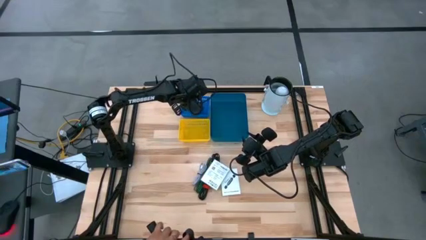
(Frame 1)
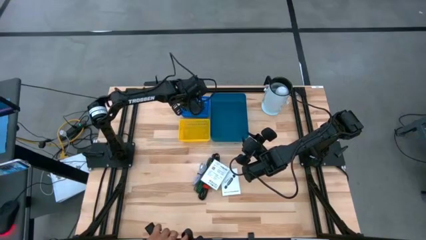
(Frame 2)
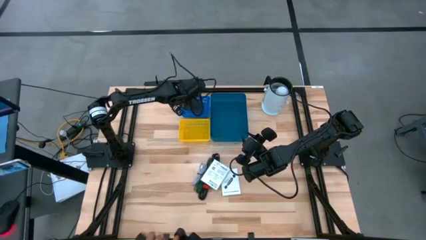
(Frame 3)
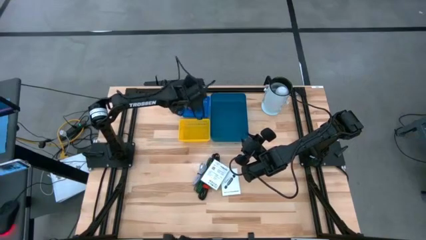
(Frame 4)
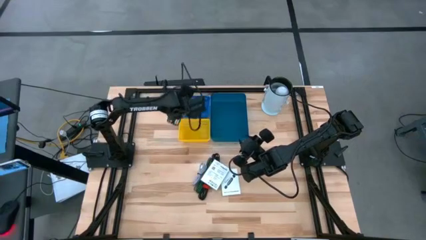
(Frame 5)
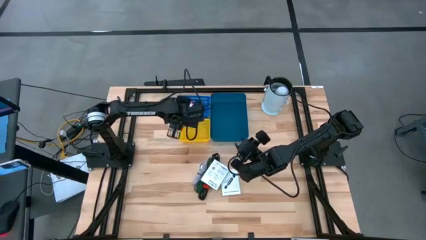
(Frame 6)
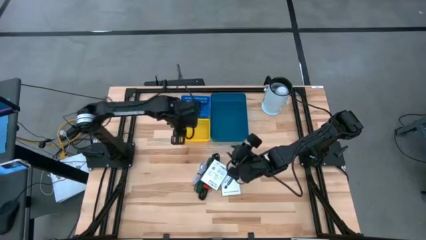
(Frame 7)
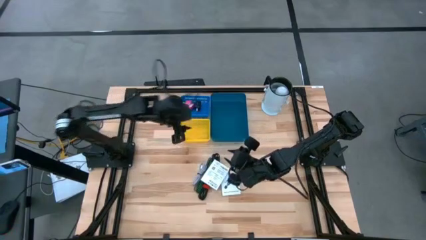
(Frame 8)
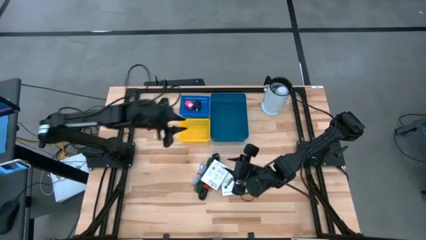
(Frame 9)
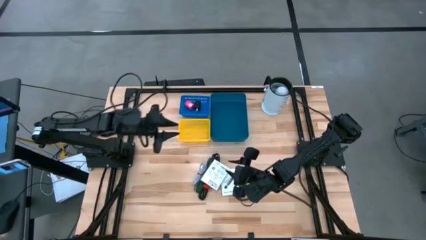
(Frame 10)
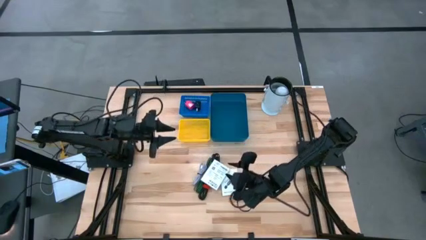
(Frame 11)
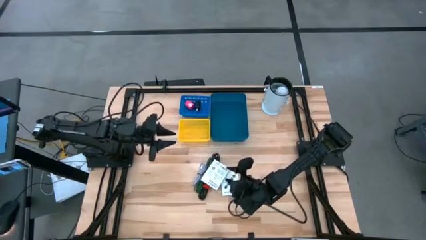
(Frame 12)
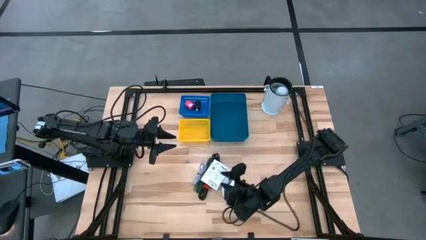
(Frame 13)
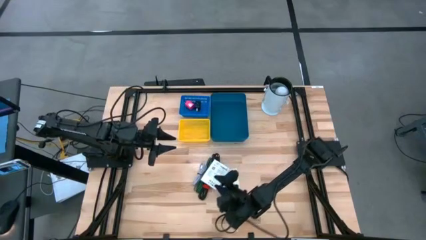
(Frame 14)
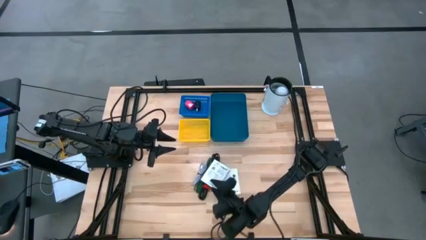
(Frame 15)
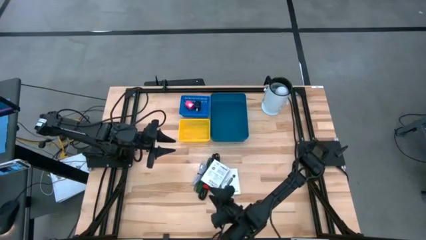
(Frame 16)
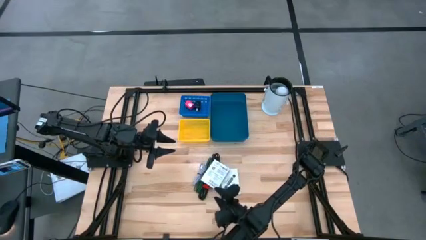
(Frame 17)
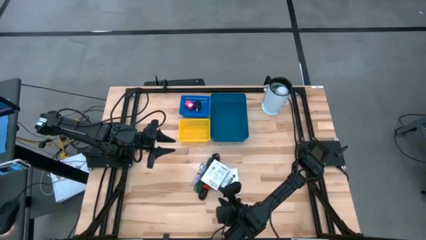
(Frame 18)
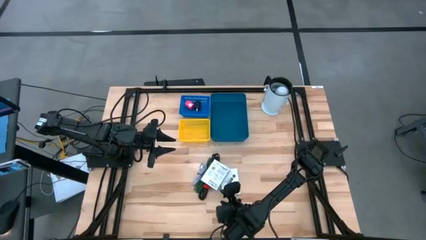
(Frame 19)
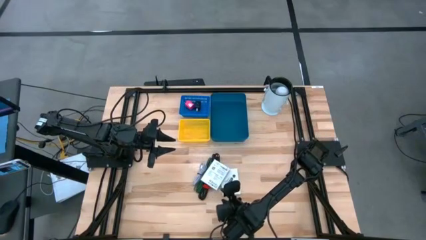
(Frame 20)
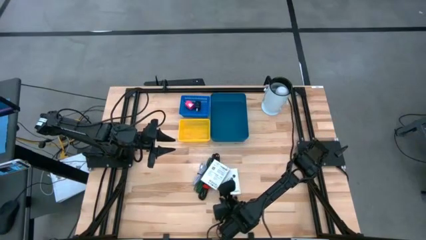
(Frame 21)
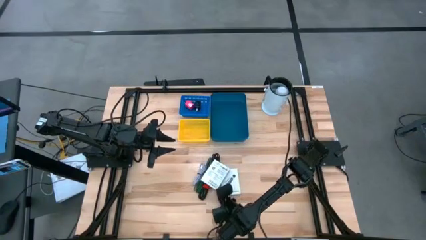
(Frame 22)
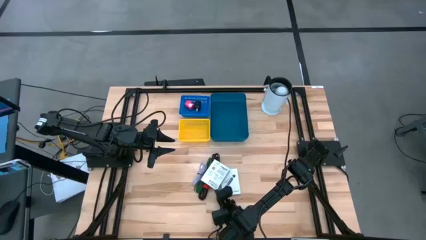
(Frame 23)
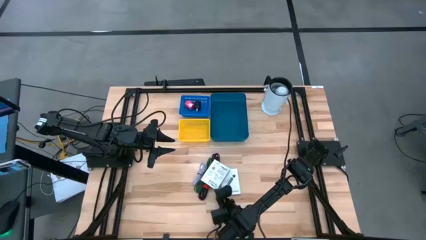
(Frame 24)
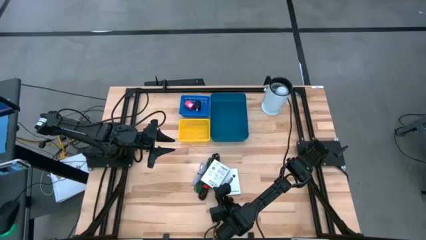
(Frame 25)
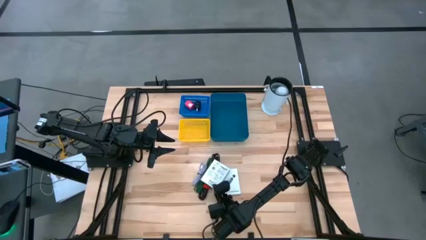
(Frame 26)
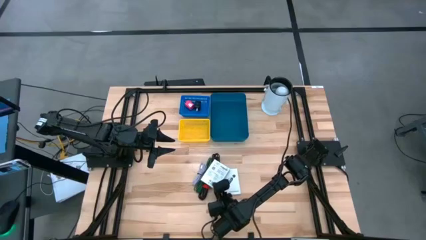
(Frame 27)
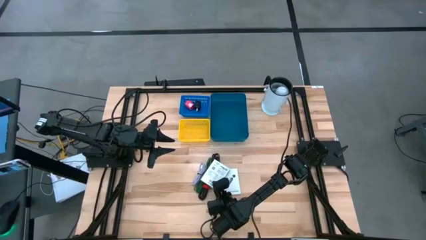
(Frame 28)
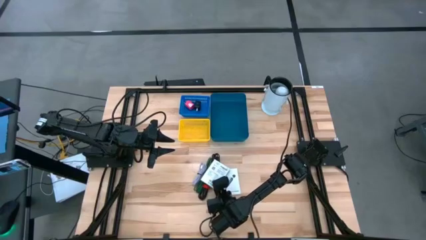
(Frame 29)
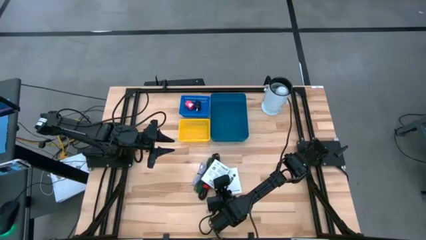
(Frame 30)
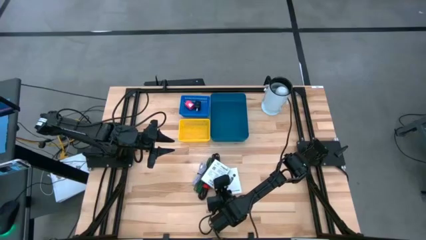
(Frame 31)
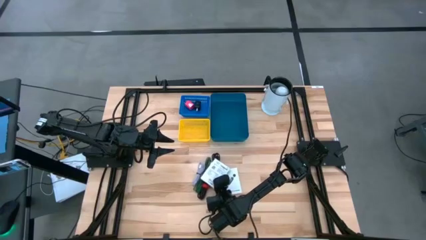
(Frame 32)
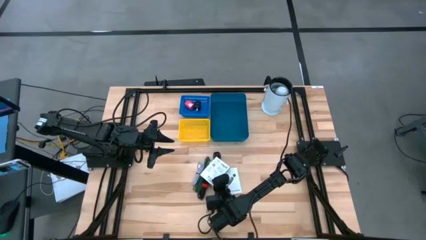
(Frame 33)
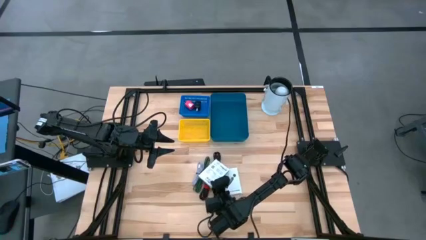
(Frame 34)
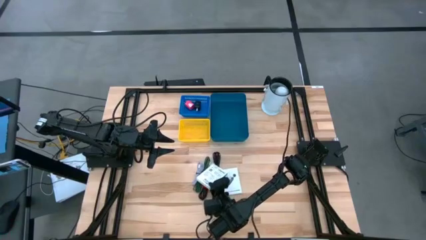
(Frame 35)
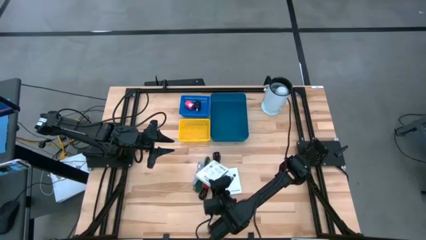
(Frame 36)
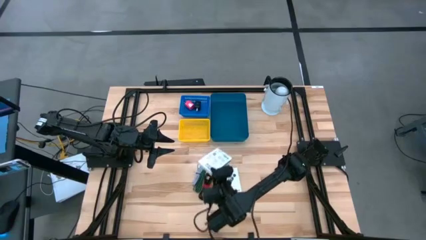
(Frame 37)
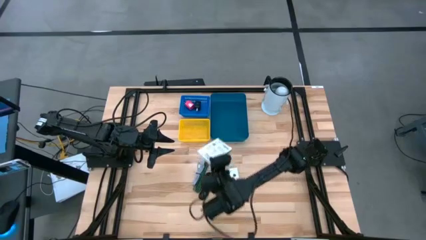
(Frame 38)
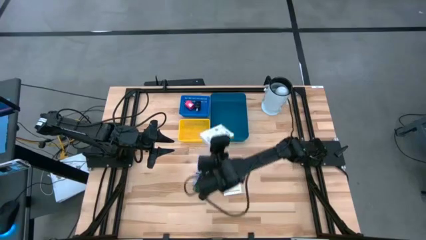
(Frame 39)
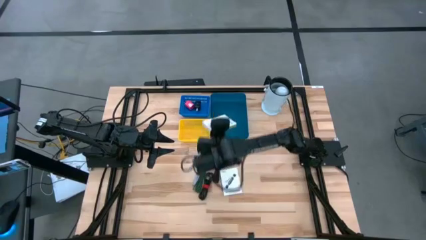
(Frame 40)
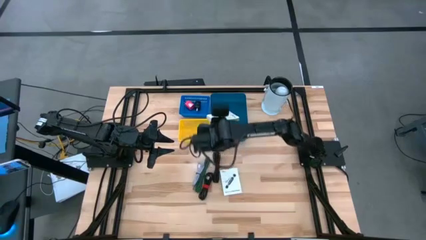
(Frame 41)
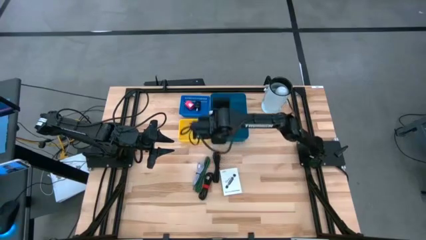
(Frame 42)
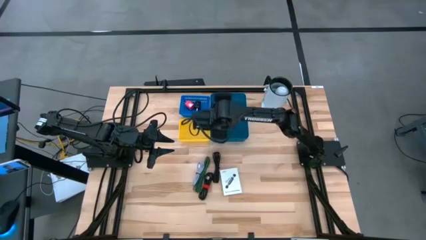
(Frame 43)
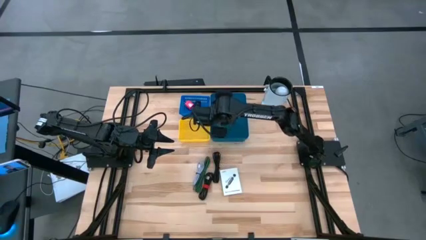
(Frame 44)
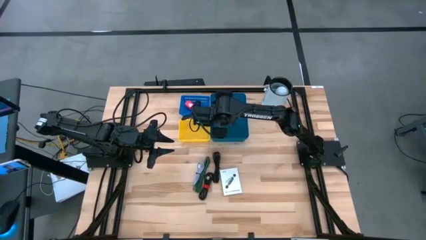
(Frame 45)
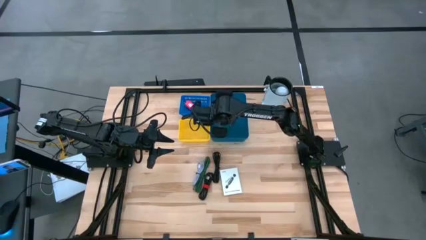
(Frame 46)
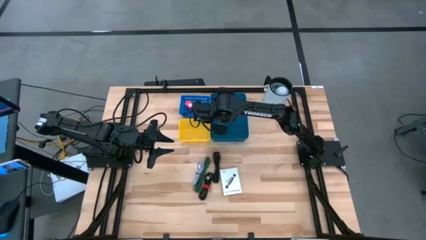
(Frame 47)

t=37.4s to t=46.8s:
Task: Pick and place items into bin
Put the left SD card reader box into the blue bin

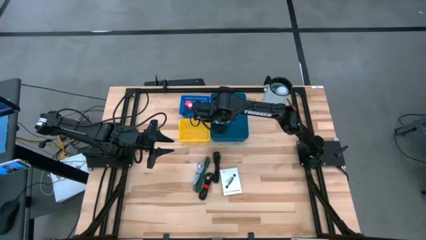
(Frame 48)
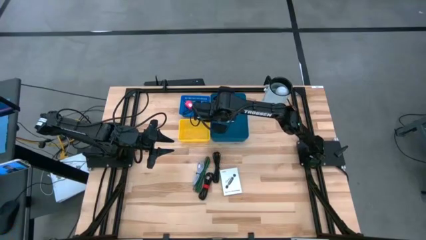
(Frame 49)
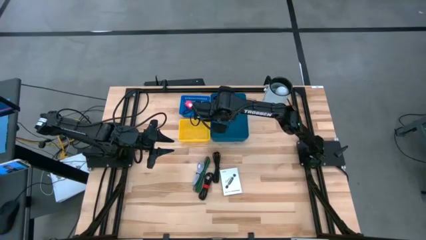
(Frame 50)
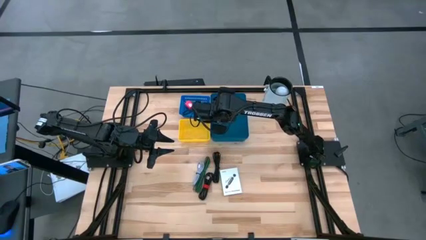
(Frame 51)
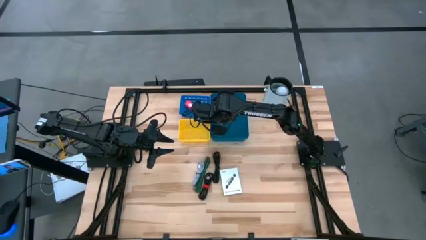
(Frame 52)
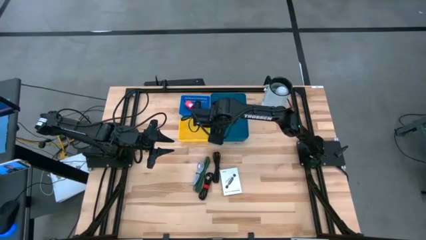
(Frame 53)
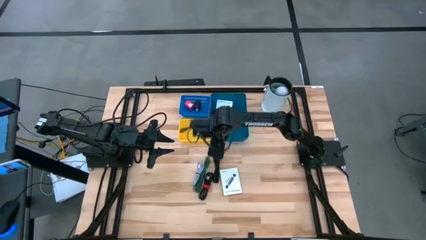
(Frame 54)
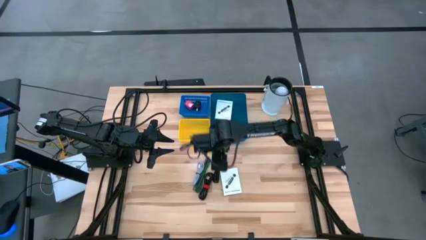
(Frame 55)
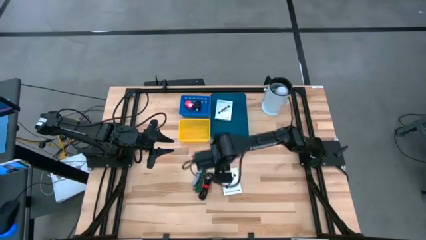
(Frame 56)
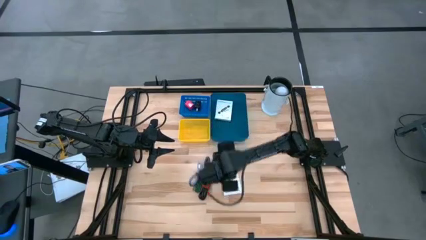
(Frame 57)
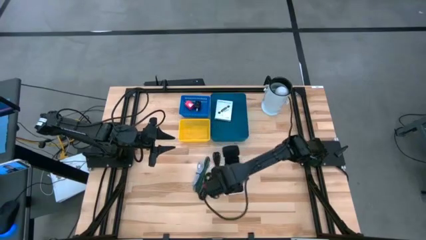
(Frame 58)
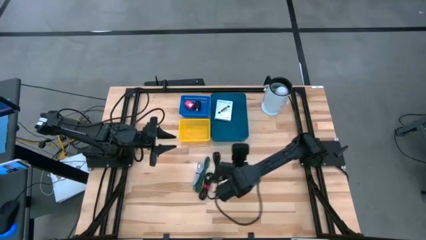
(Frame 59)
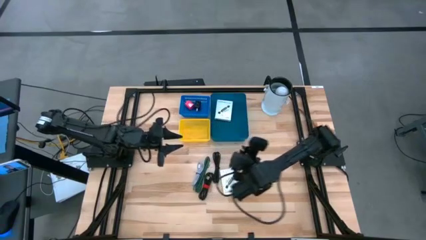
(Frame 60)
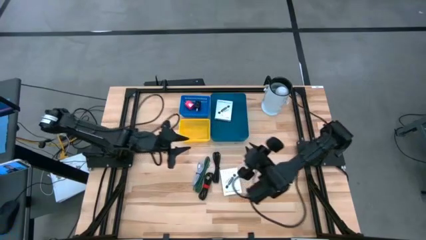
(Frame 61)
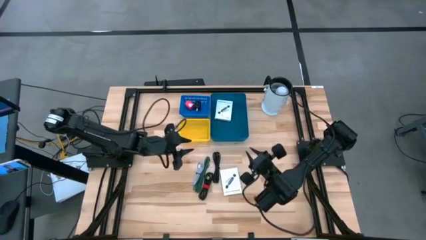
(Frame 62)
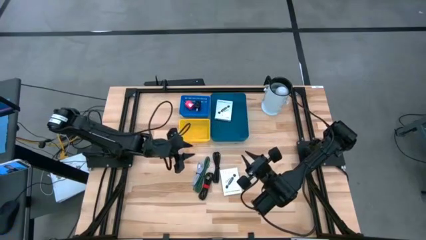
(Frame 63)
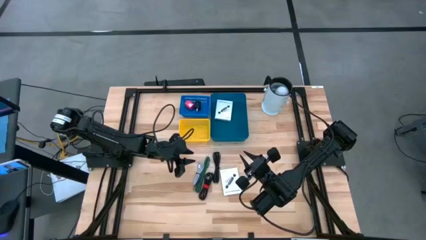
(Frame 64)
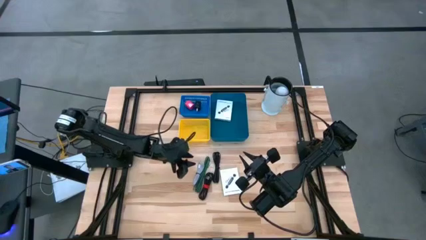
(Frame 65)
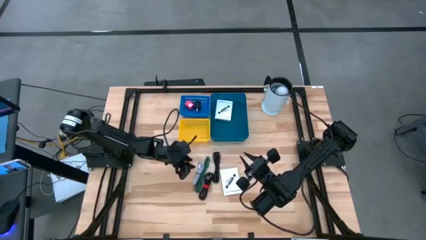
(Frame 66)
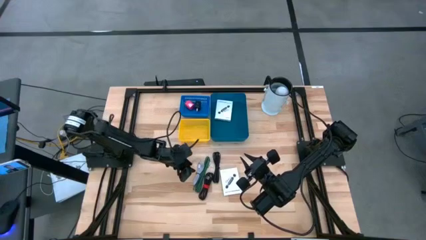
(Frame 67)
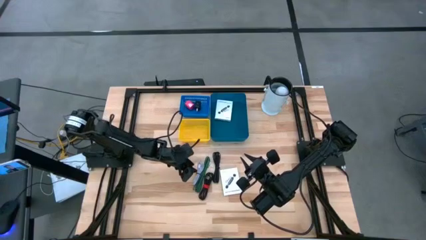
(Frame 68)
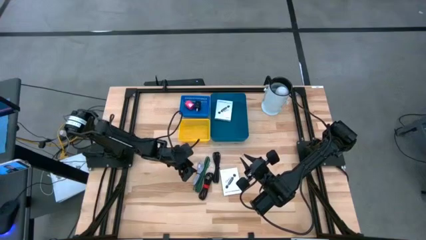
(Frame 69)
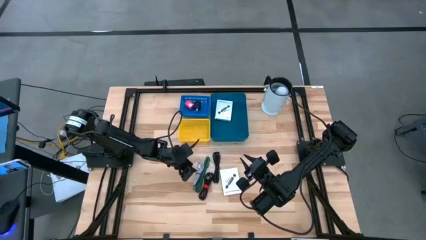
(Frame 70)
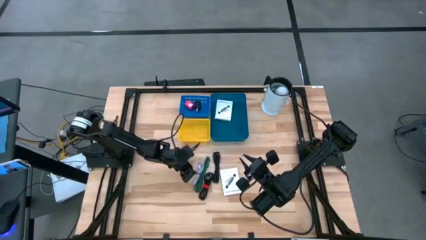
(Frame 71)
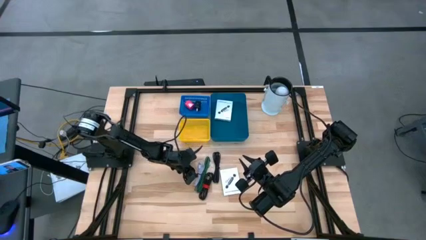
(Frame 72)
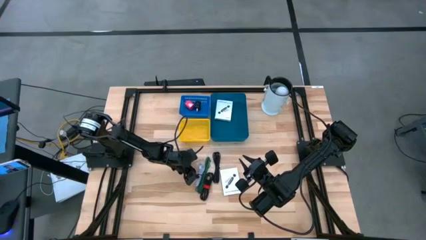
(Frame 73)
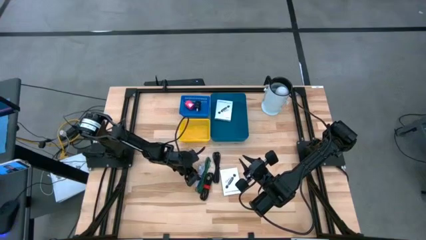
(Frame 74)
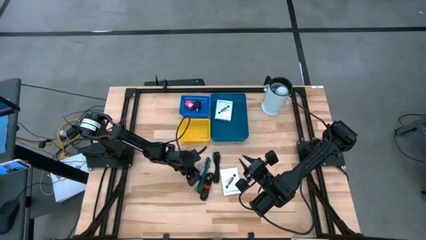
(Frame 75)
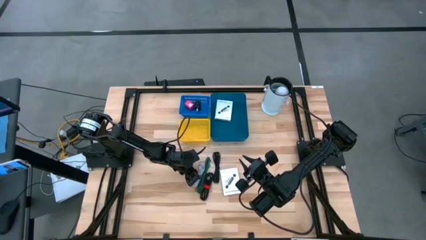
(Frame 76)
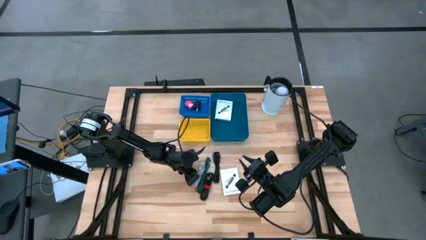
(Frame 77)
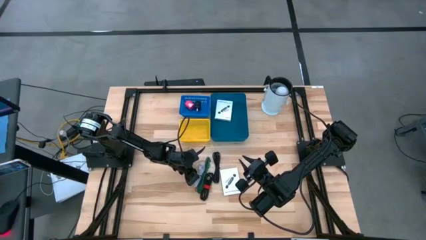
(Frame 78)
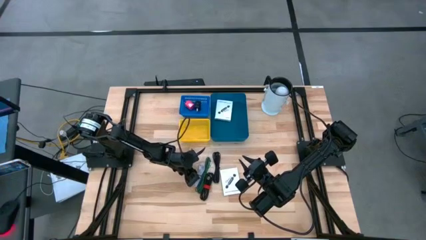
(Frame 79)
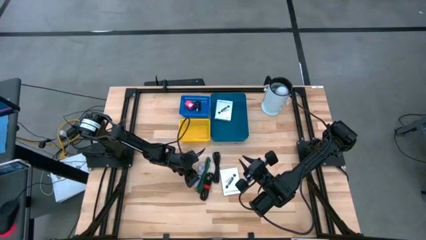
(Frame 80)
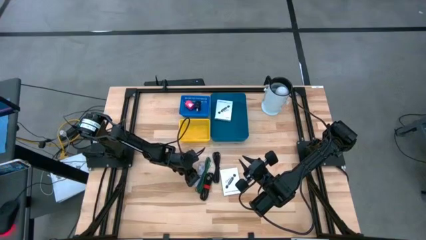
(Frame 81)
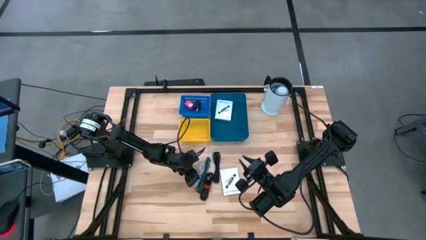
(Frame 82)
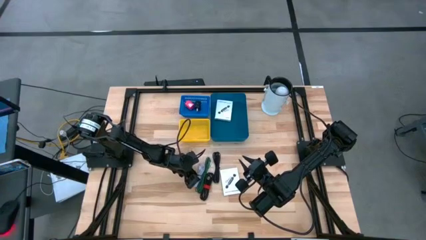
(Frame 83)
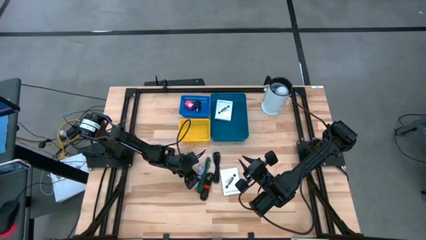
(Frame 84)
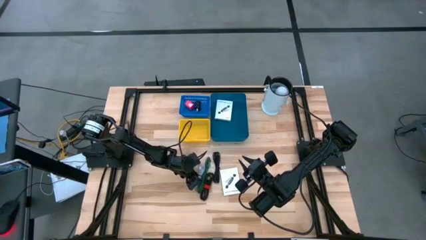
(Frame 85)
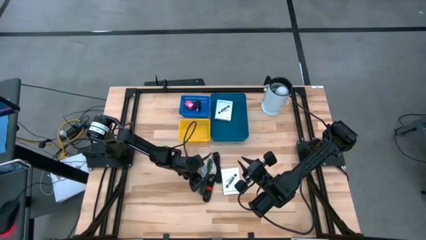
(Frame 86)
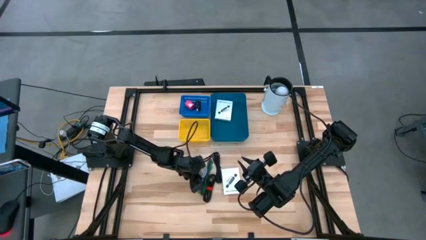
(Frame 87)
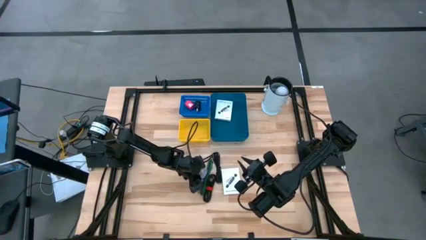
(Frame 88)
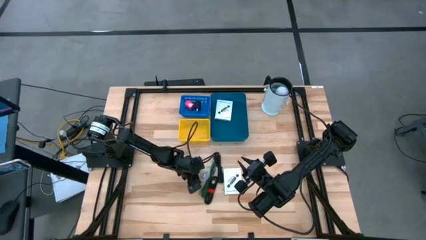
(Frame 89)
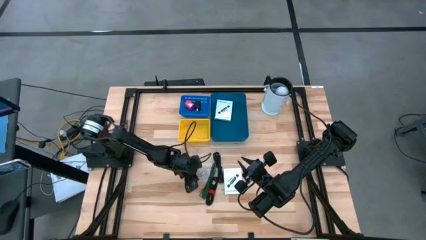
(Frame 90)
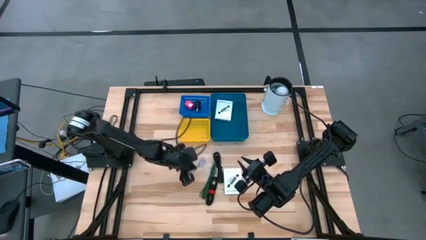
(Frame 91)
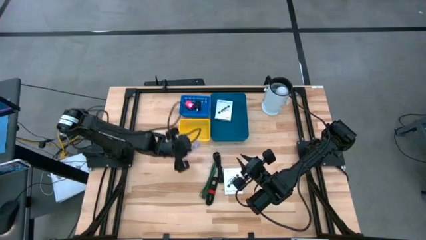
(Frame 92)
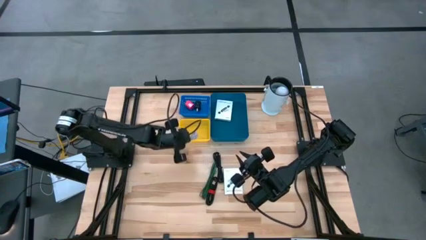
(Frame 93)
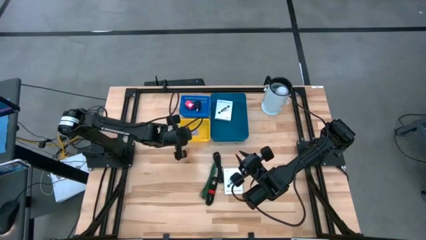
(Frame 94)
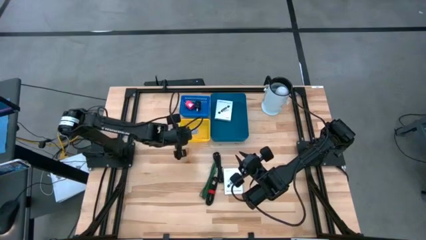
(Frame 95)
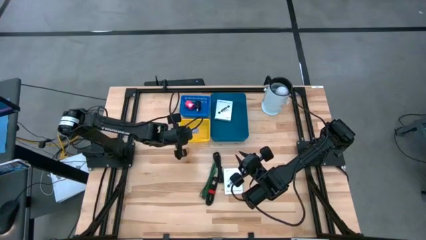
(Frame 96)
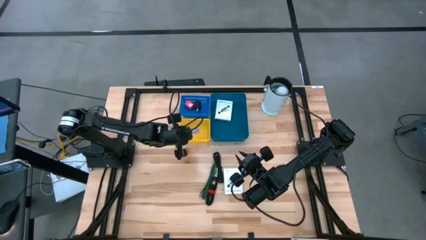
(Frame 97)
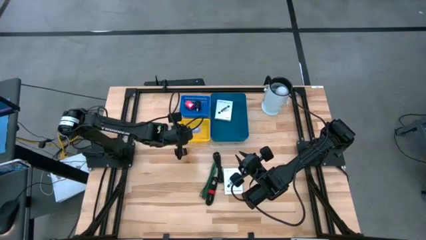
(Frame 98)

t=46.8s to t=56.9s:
Put the white USB cable into the yellow basket
